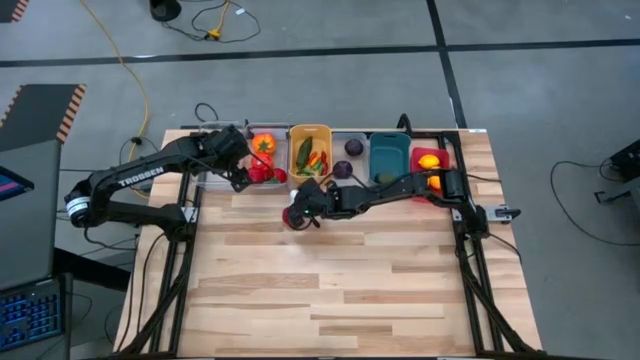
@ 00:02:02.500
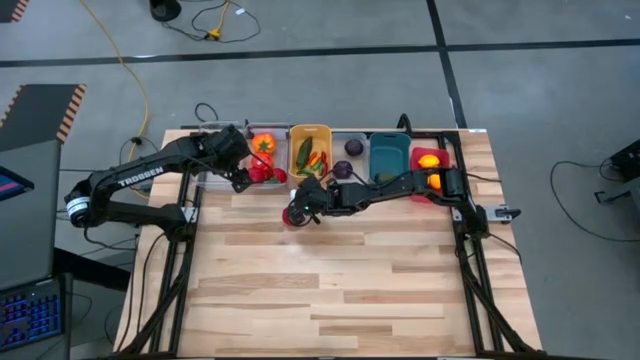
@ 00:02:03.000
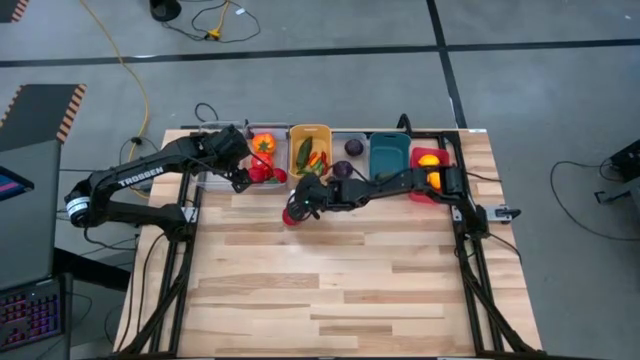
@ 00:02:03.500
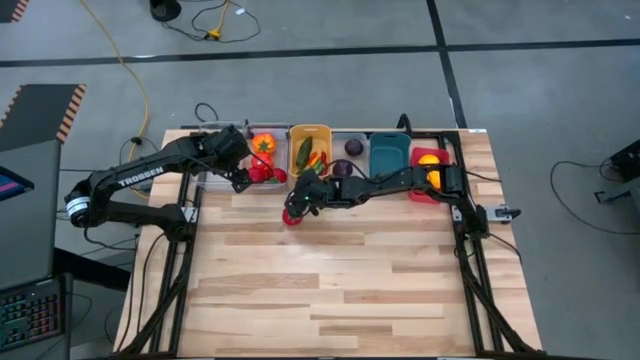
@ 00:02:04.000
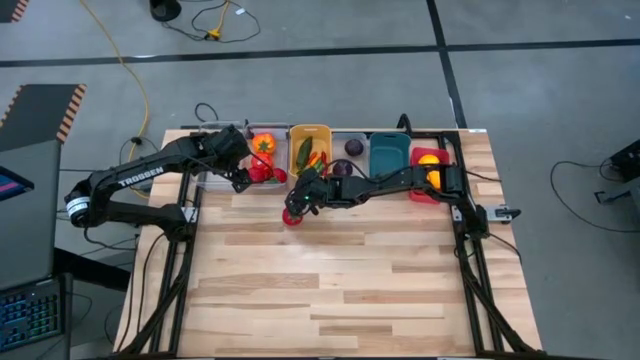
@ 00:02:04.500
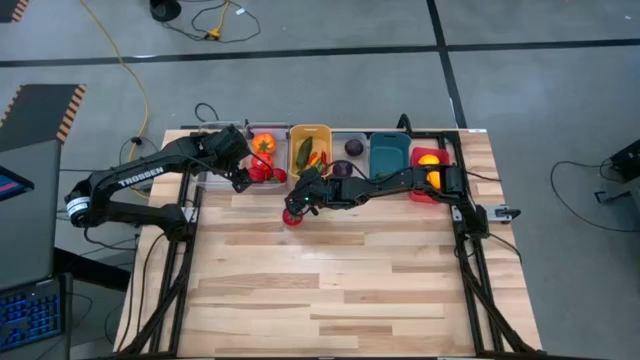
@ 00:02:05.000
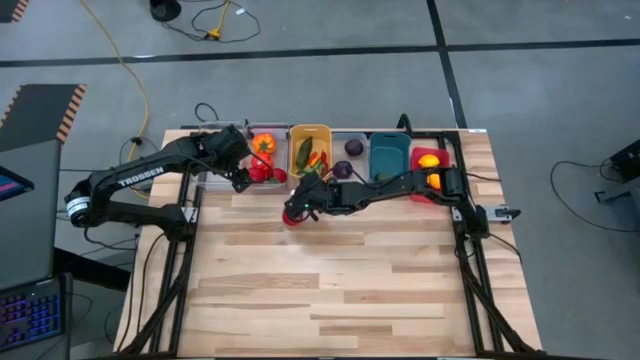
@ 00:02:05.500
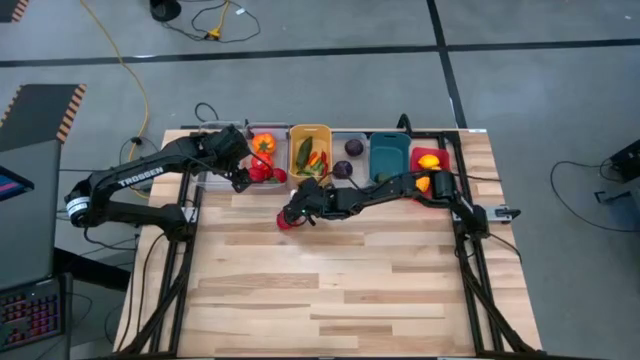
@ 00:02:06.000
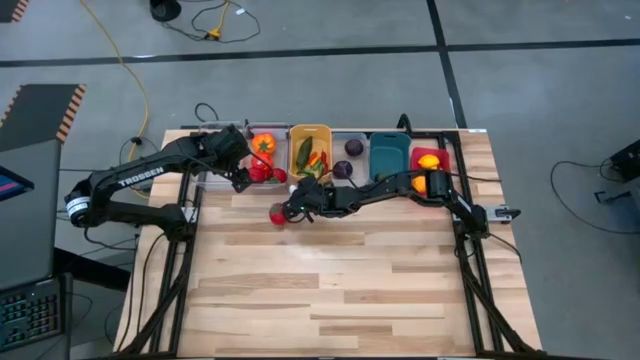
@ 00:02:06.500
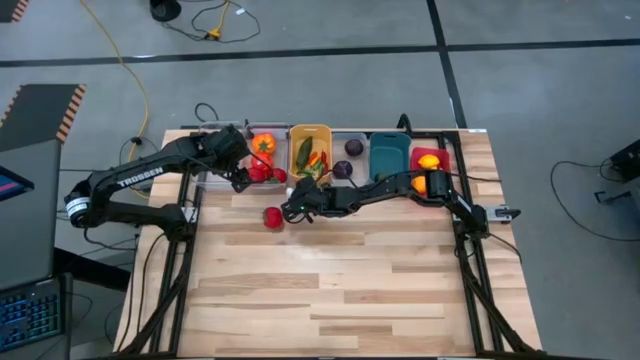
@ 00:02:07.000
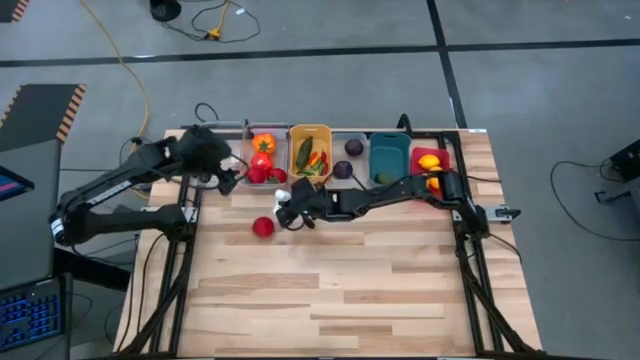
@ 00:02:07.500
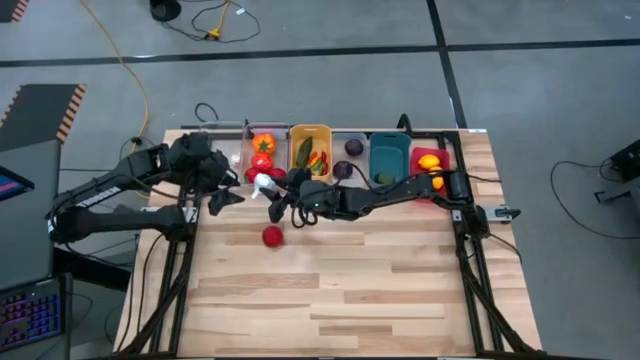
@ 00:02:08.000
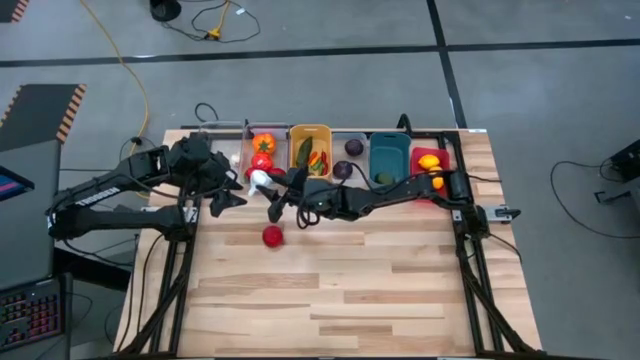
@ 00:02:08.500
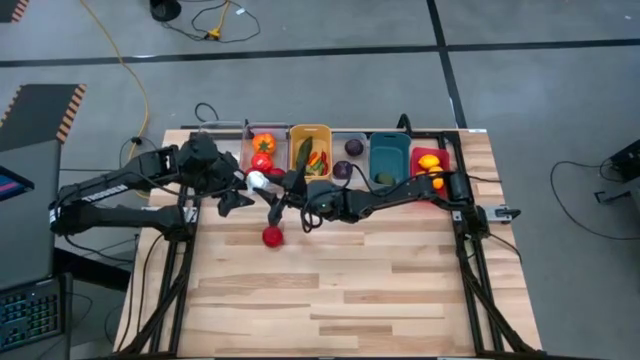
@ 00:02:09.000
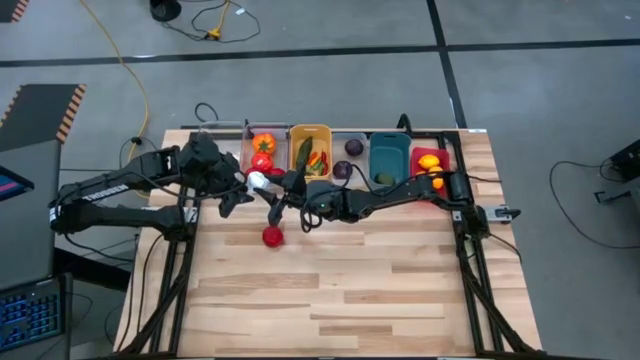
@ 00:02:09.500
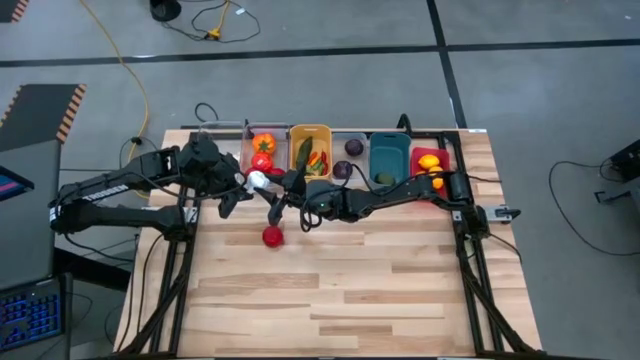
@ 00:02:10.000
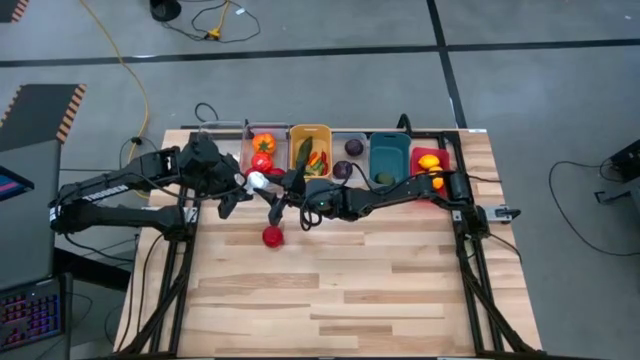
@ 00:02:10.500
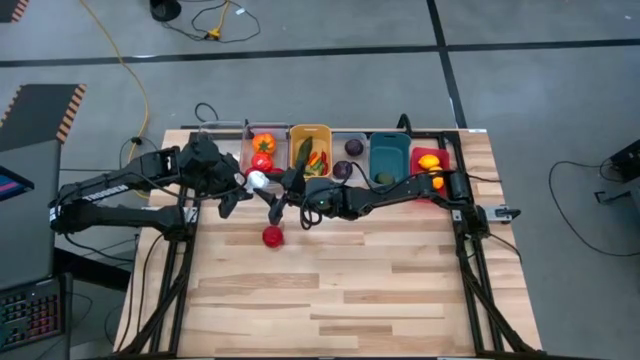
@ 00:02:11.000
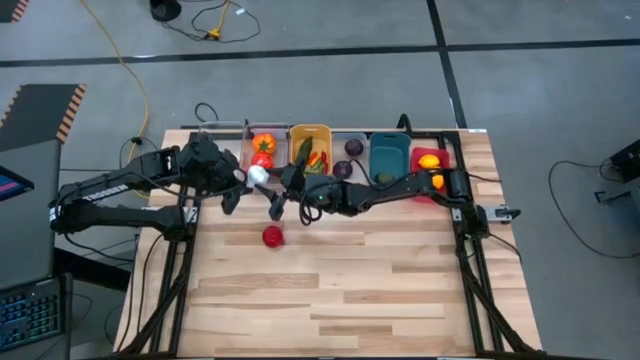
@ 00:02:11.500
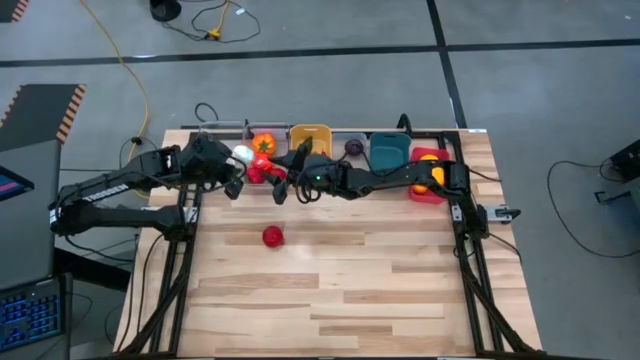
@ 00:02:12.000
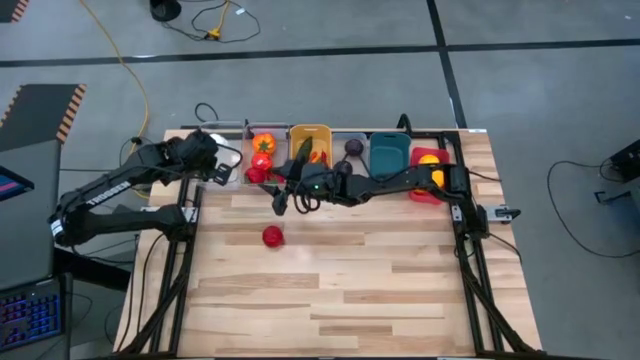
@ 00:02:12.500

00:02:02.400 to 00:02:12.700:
Task: Sort produce into baskets
Put the garlic into the left transparent bin

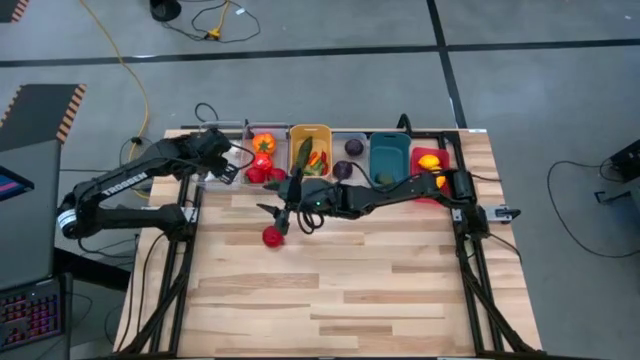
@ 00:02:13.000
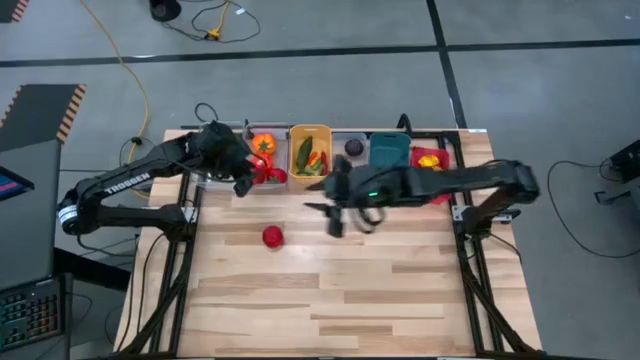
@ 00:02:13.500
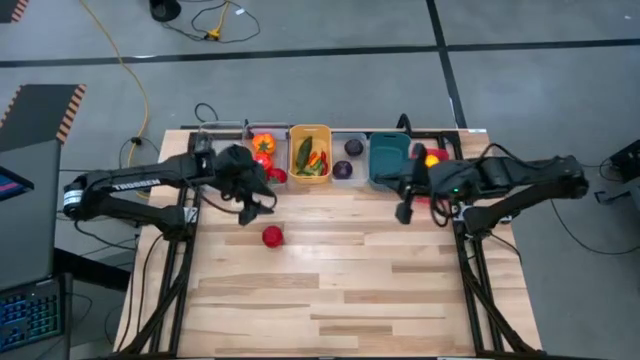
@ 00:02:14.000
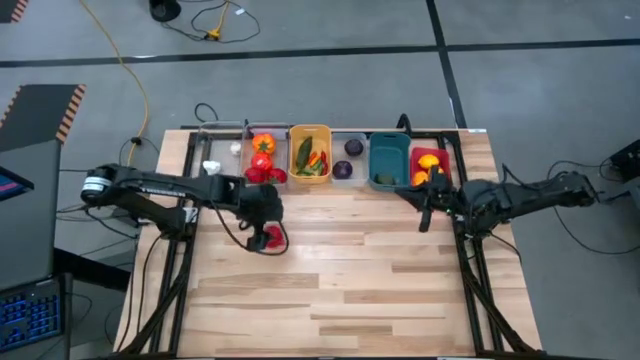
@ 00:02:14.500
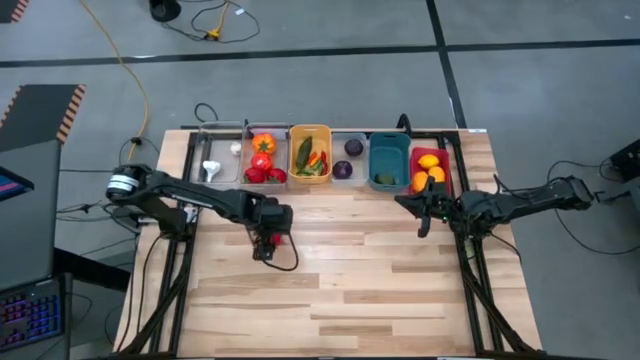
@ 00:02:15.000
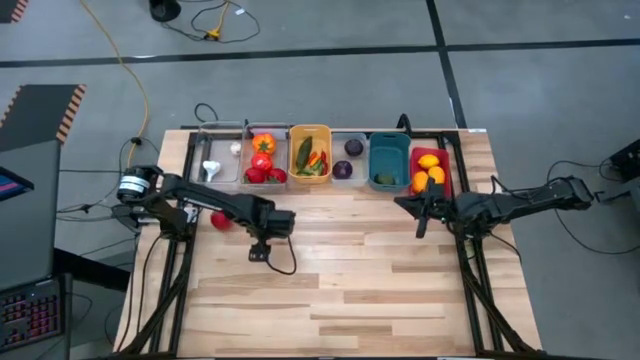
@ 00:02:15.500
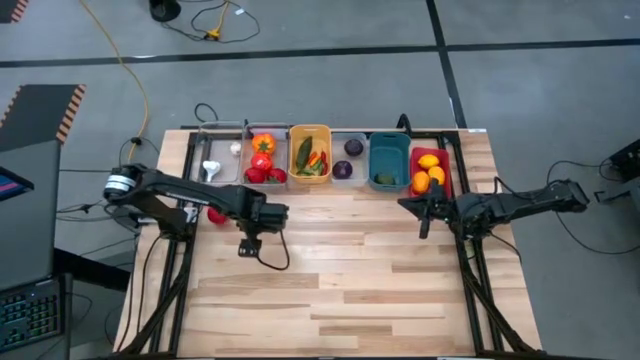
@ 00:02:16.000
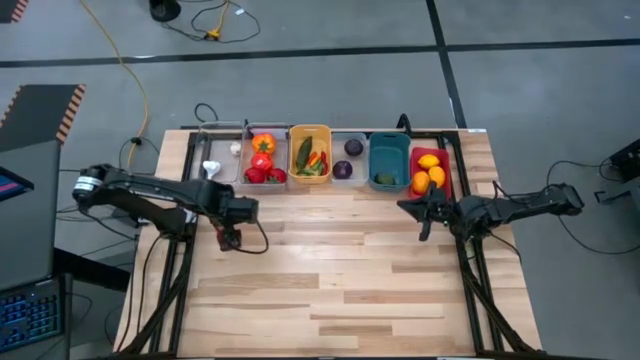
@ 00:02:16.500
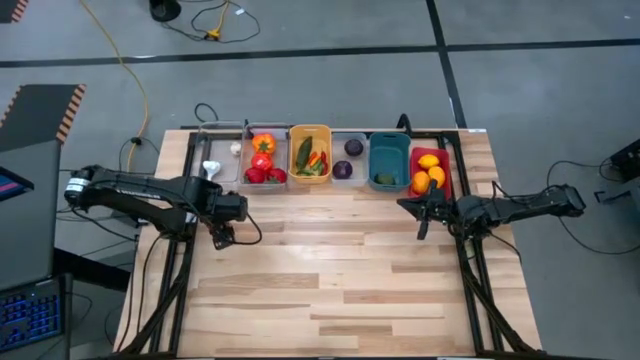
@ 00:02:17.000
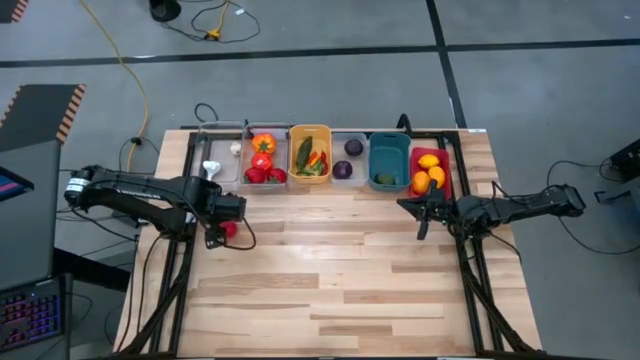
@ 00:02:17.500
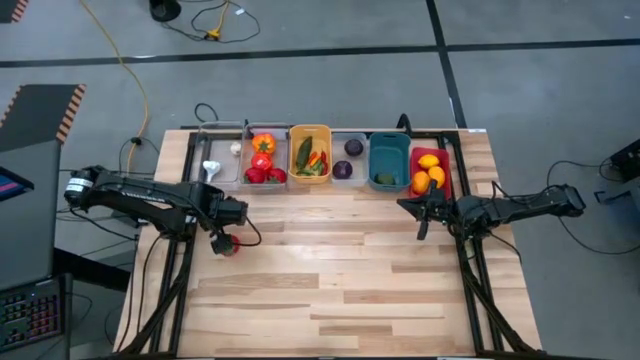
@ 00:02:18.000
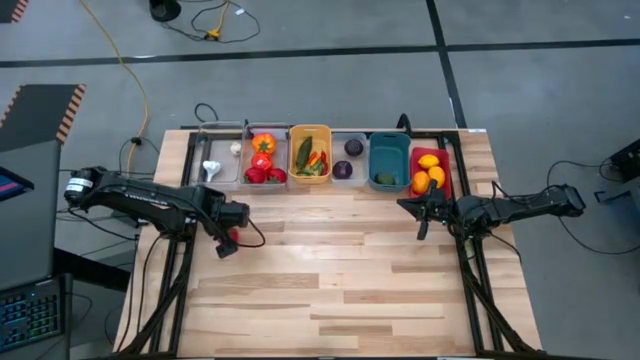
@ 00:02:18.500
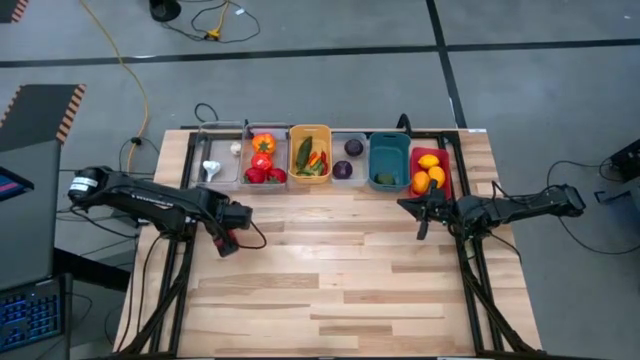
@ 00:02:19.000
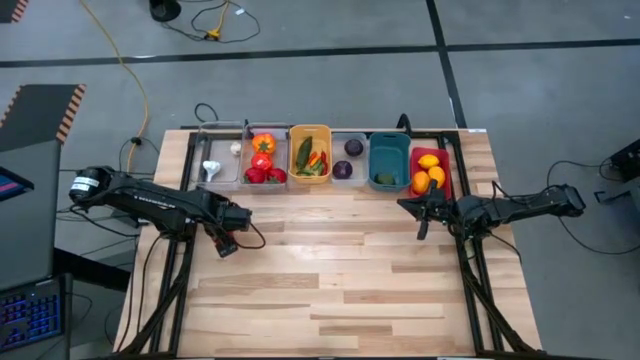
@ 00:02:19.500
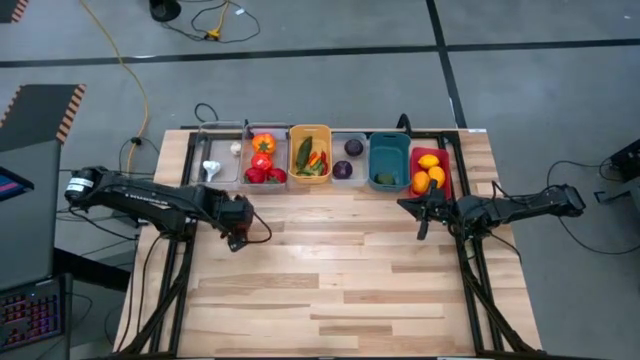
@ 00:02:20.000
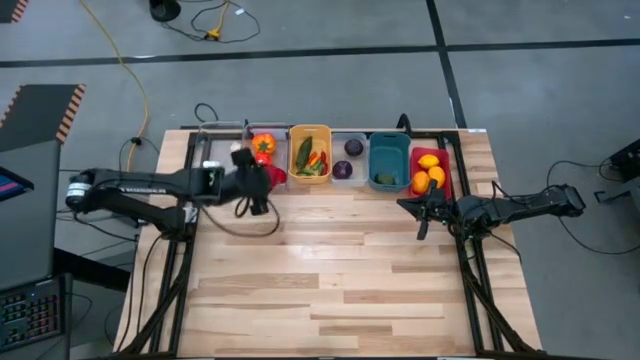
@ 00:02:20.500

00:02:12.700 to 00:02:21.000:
Put the tomato into the right transparent bin

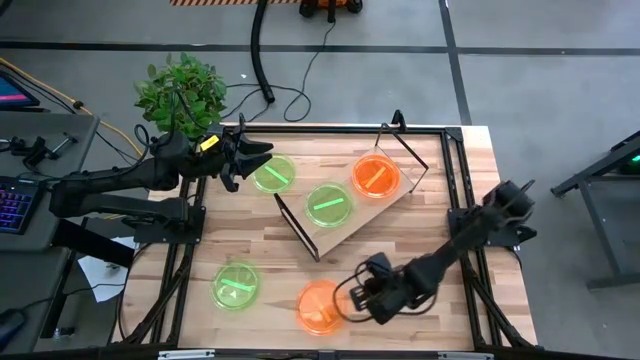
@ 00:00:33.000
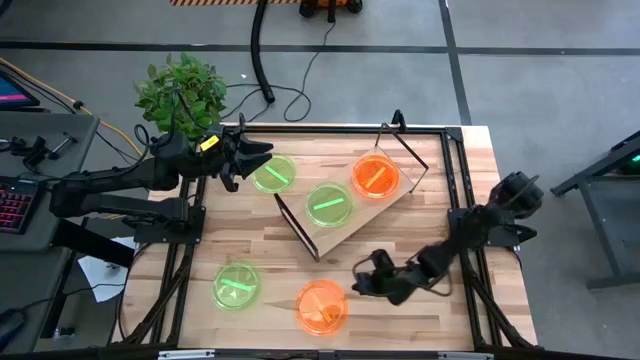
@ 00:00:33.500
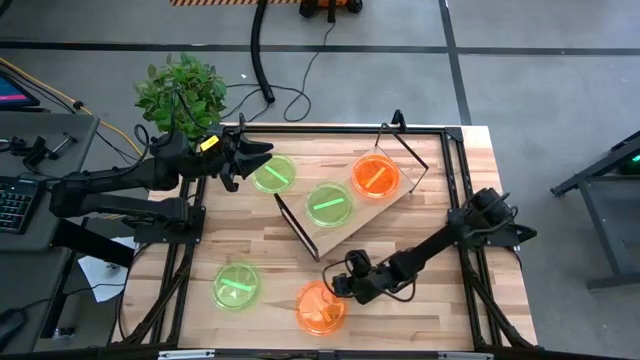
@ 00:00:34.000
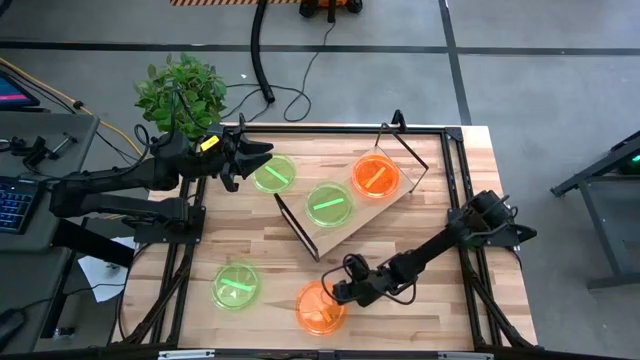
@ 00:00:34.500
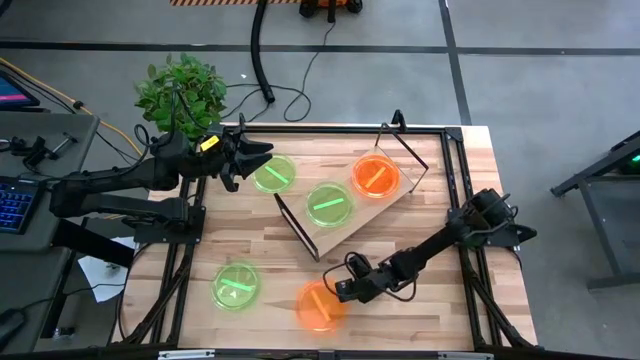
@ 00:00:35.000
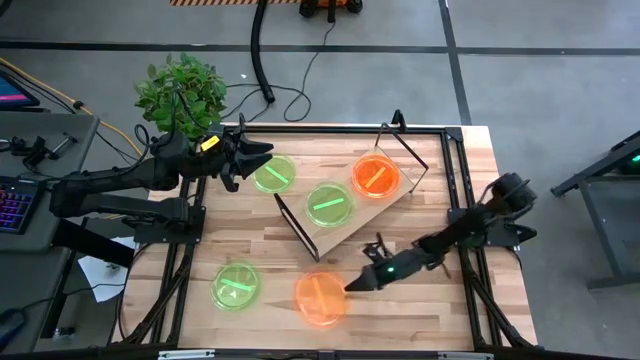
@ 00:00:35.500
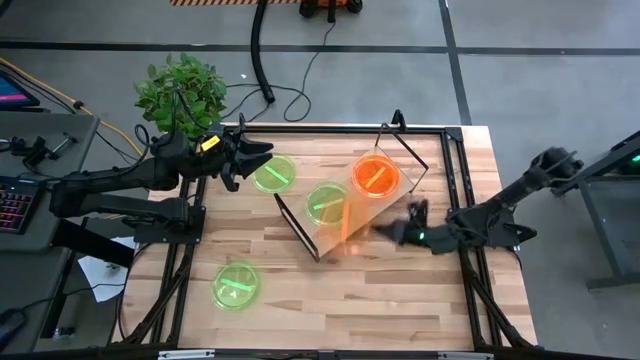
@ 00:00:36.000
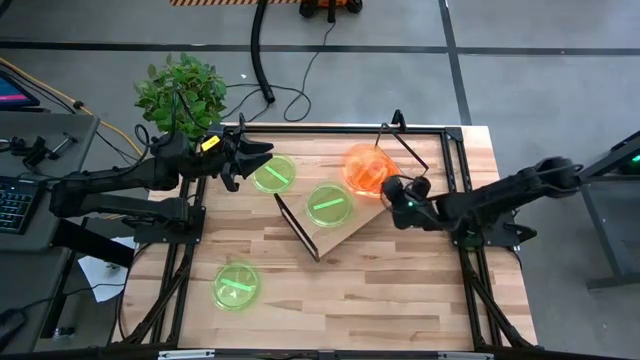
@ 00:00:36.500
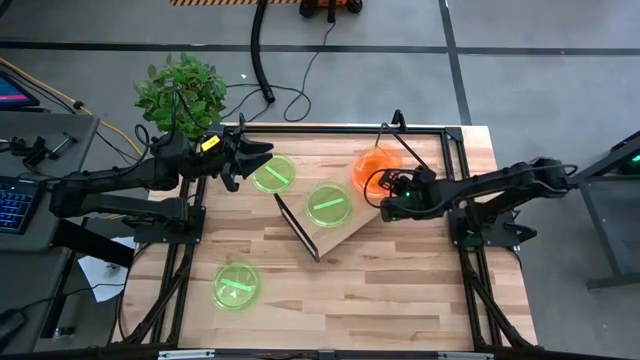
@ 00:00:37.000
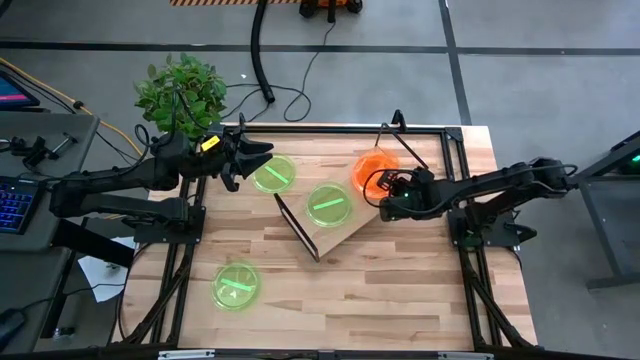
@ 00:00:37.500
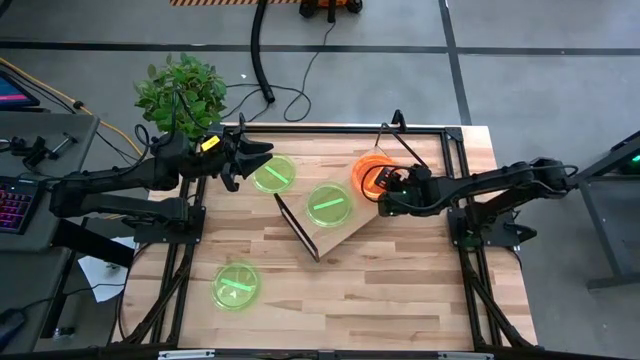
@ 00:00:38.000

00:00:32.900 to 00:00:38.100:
Task: Place and stack plates onto a shelf
Stack the orange plate on the top of the orange plate on the shelf
